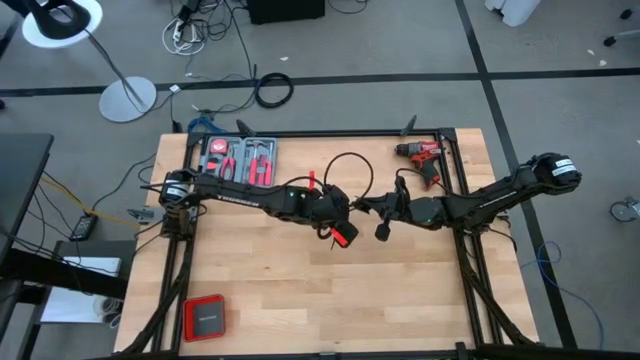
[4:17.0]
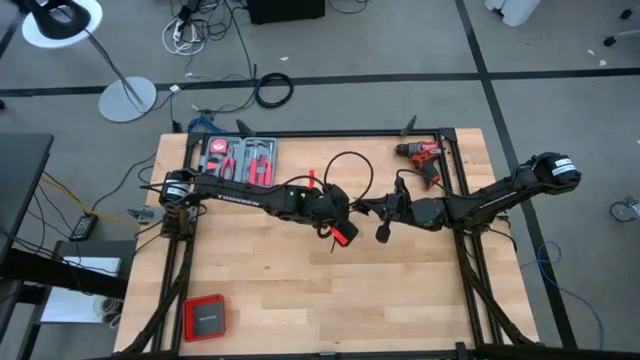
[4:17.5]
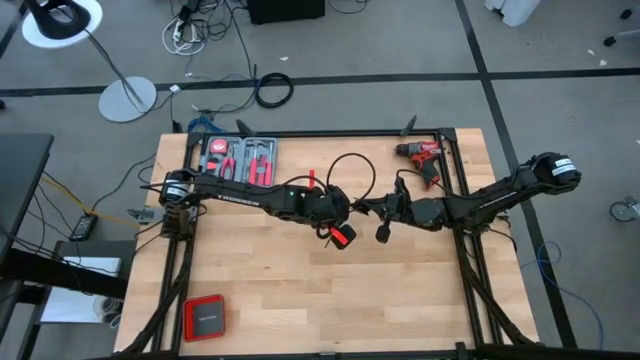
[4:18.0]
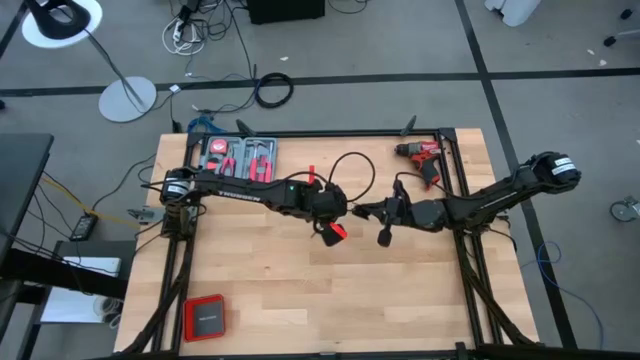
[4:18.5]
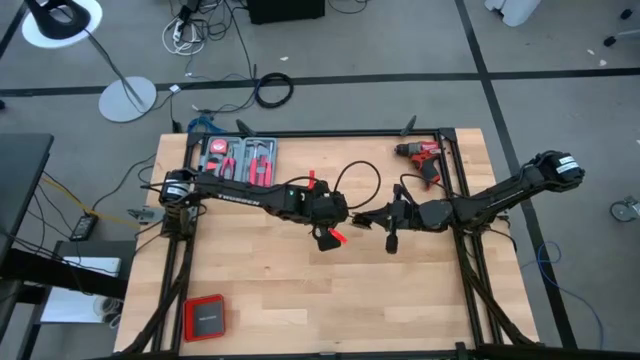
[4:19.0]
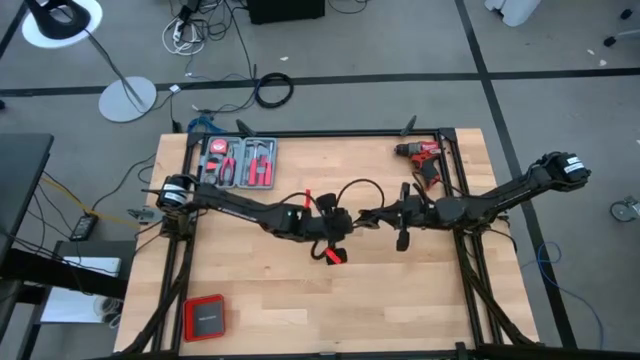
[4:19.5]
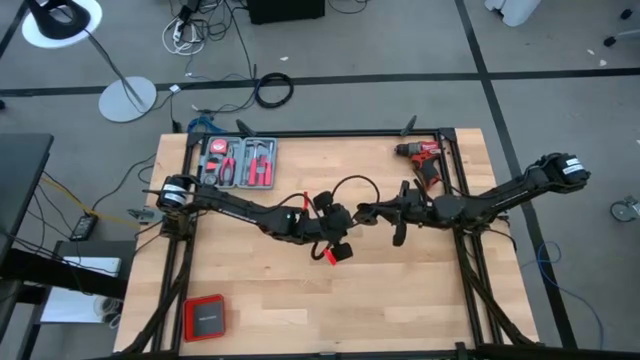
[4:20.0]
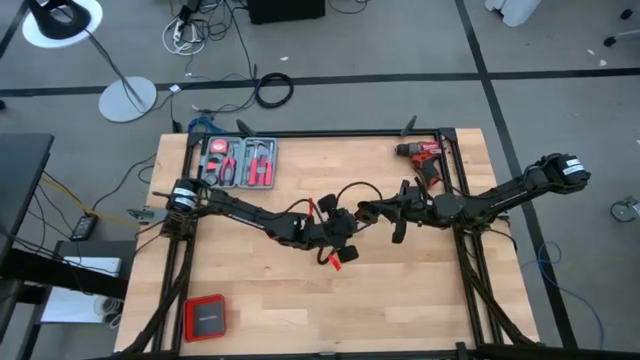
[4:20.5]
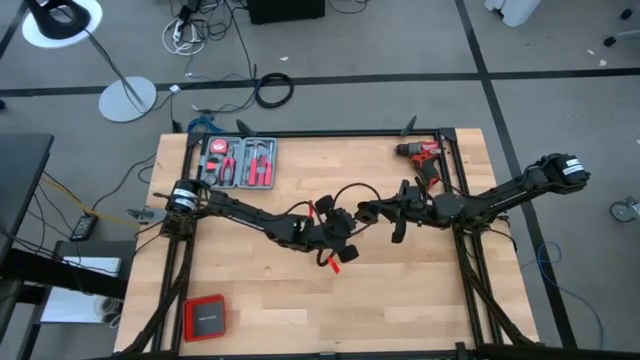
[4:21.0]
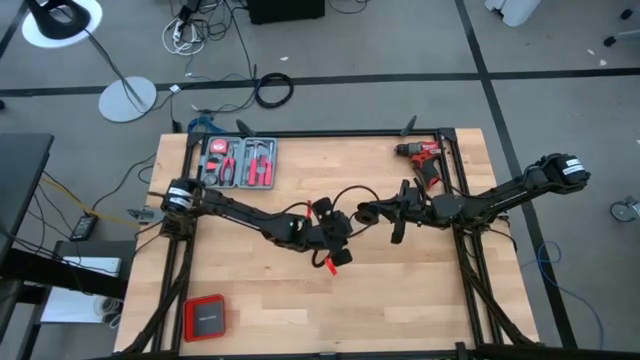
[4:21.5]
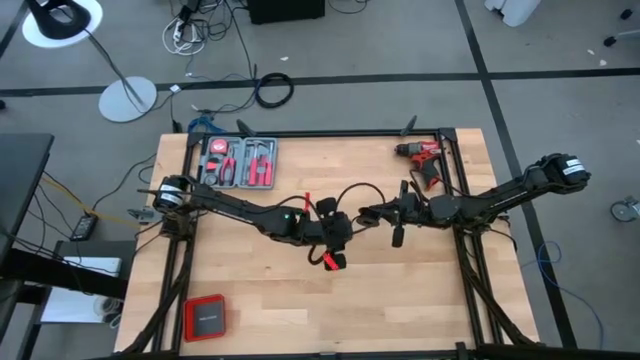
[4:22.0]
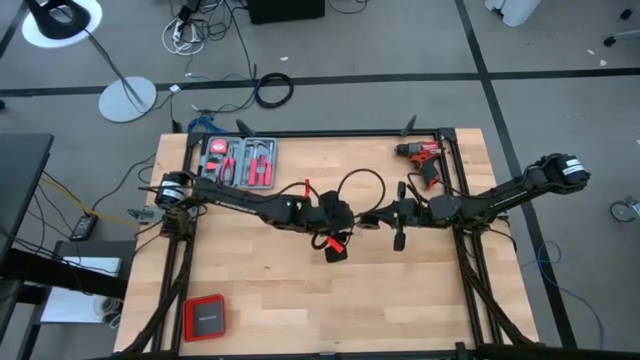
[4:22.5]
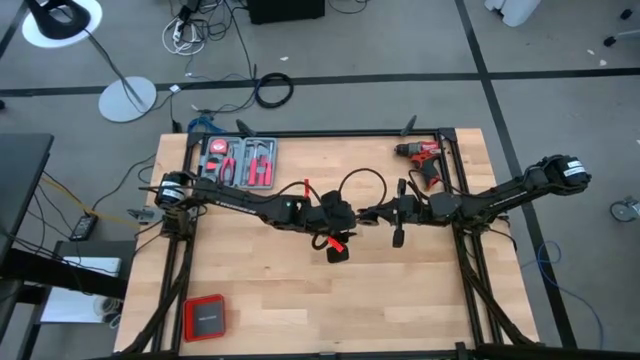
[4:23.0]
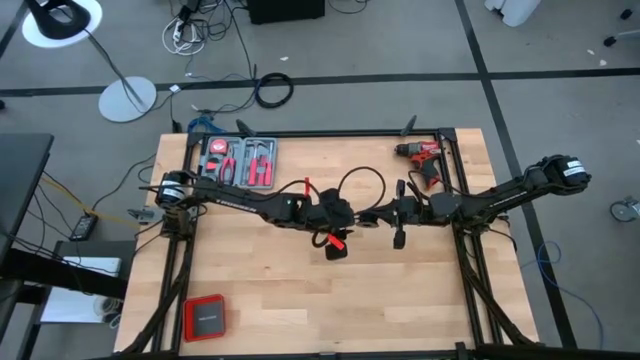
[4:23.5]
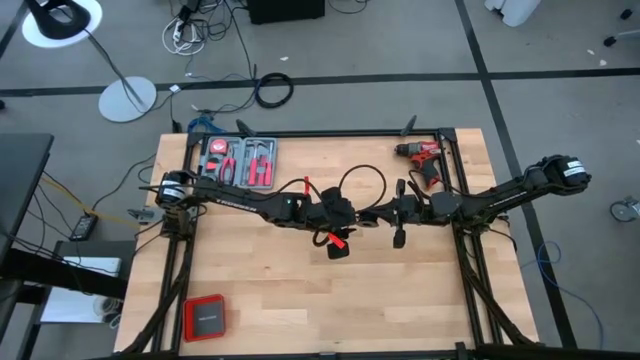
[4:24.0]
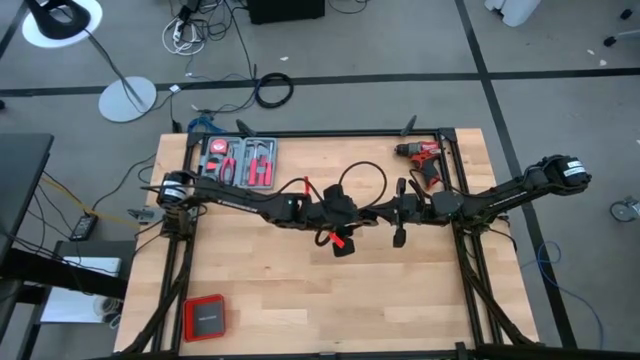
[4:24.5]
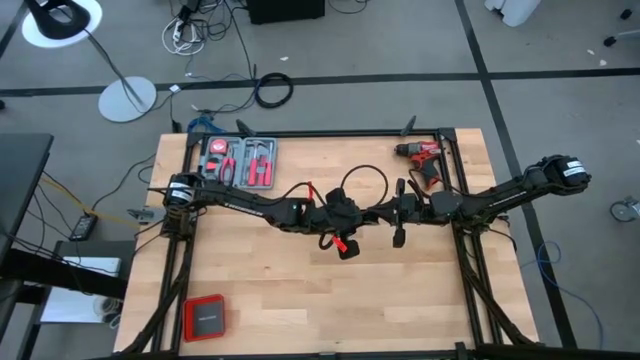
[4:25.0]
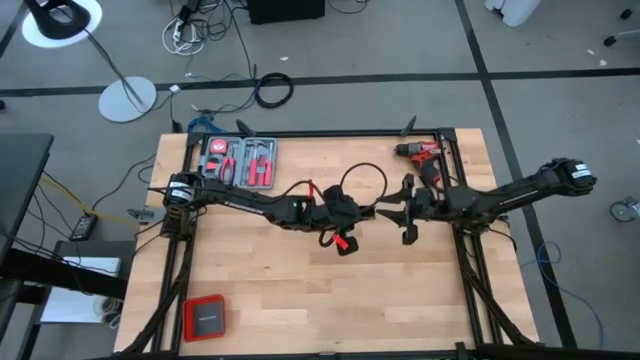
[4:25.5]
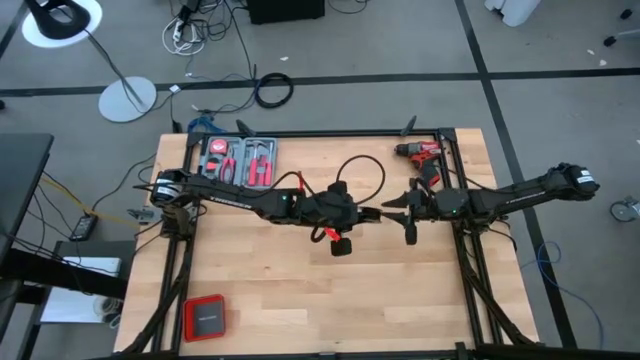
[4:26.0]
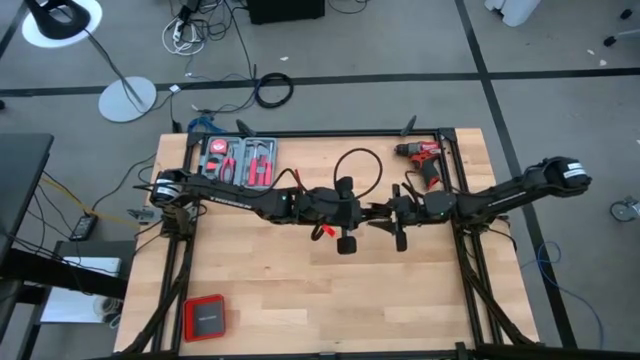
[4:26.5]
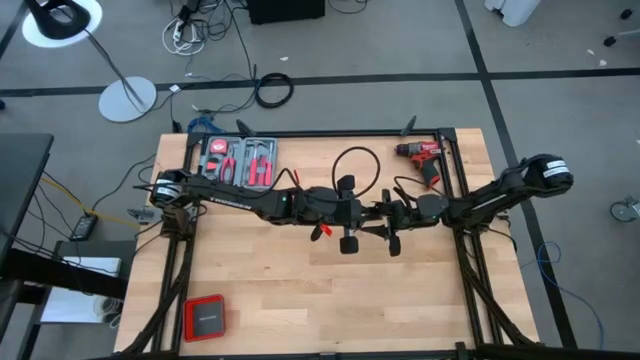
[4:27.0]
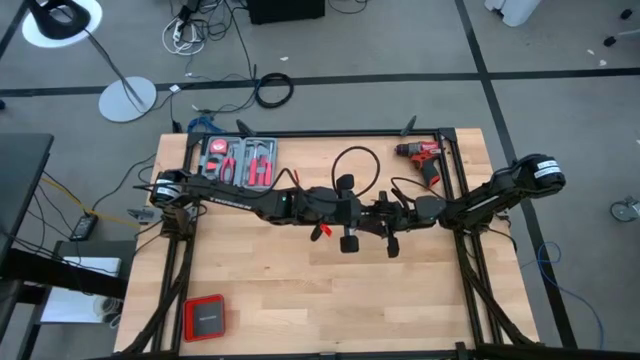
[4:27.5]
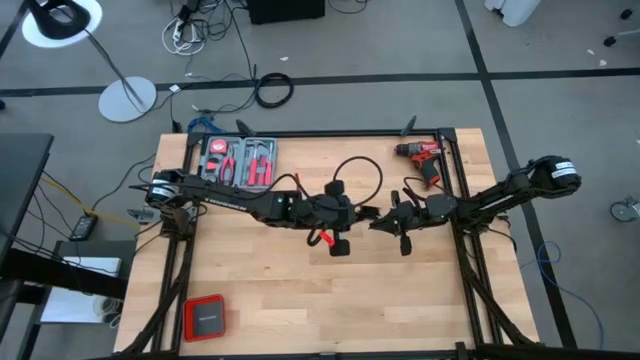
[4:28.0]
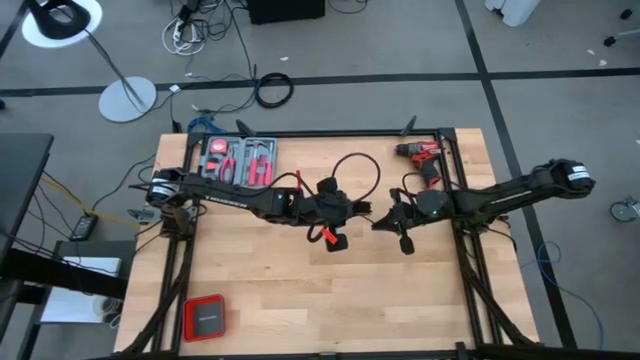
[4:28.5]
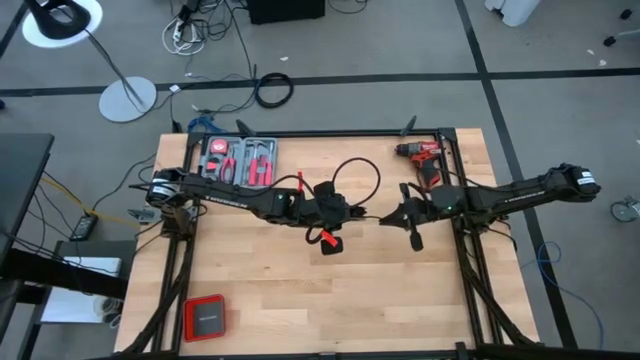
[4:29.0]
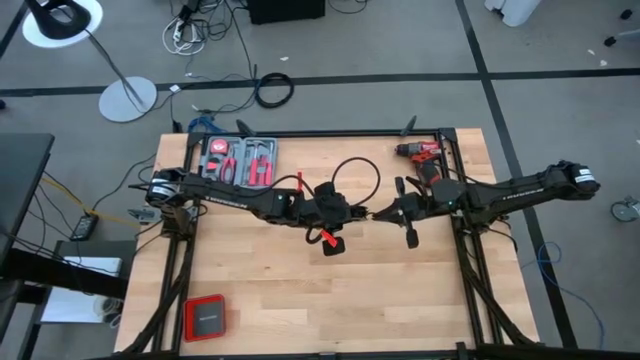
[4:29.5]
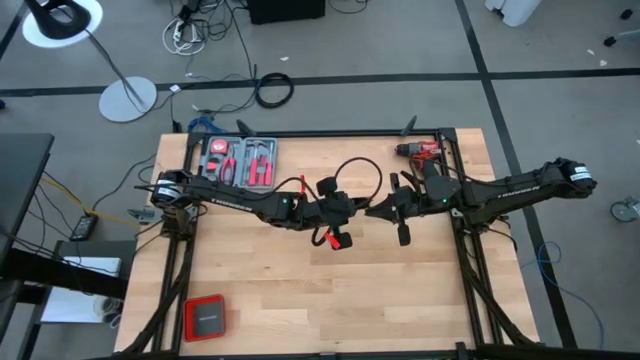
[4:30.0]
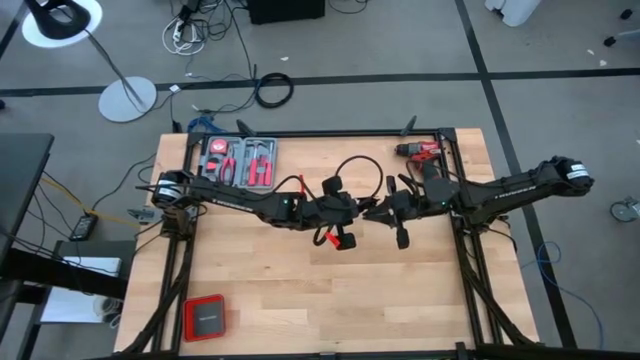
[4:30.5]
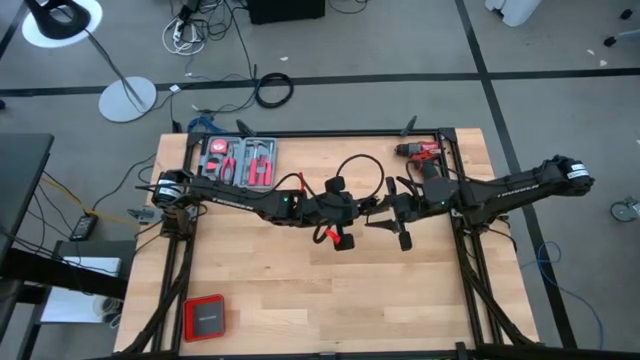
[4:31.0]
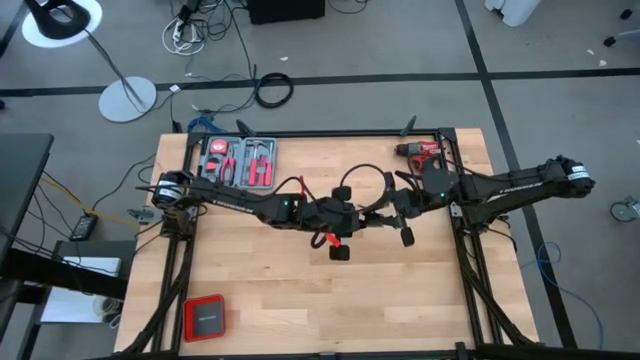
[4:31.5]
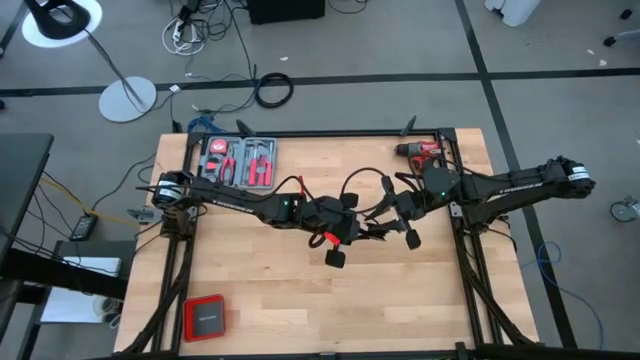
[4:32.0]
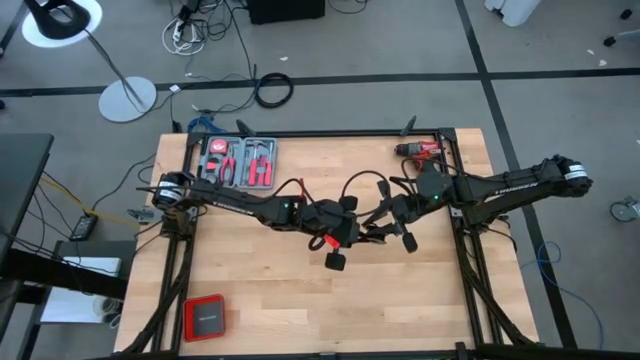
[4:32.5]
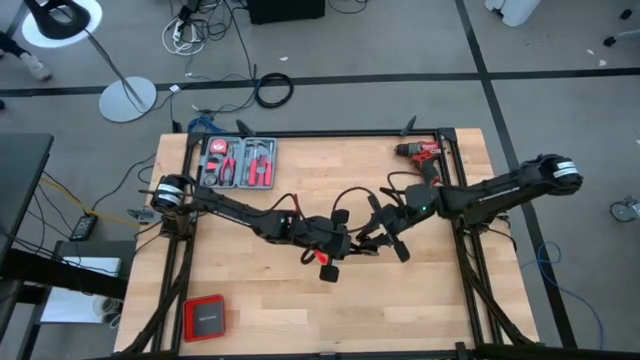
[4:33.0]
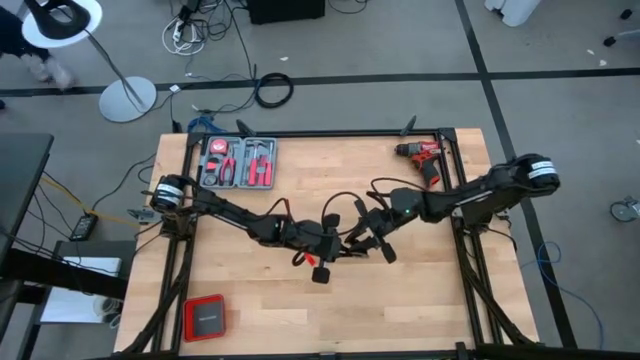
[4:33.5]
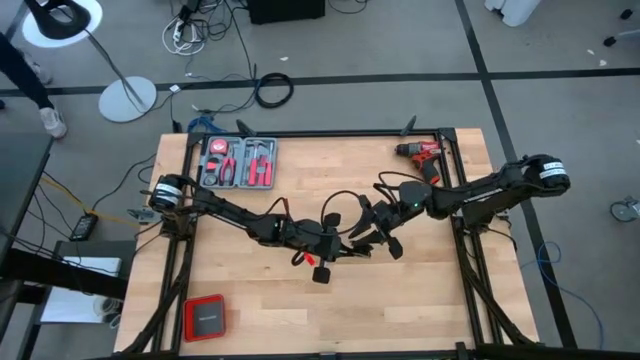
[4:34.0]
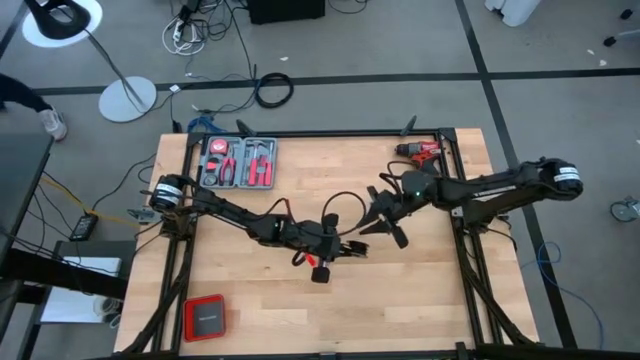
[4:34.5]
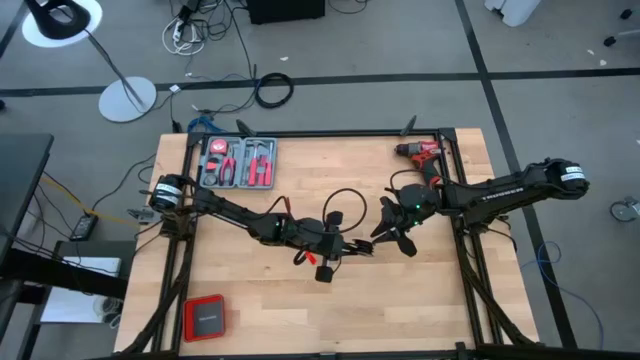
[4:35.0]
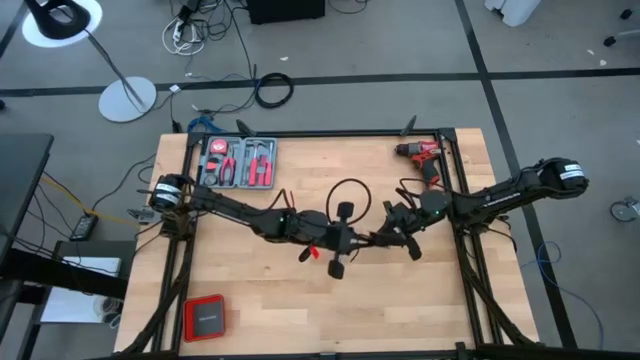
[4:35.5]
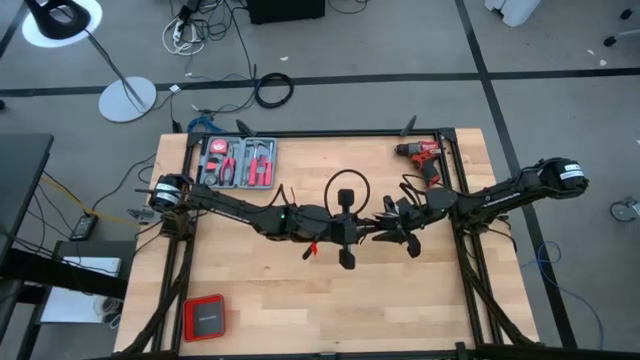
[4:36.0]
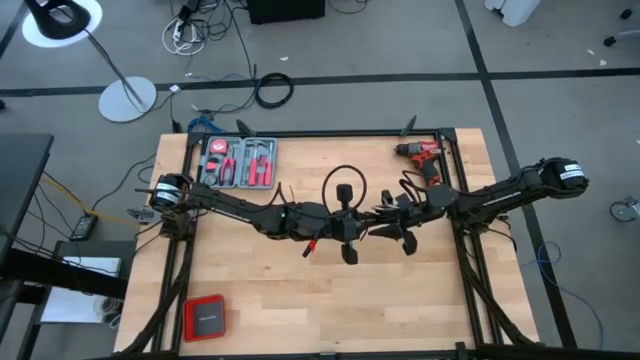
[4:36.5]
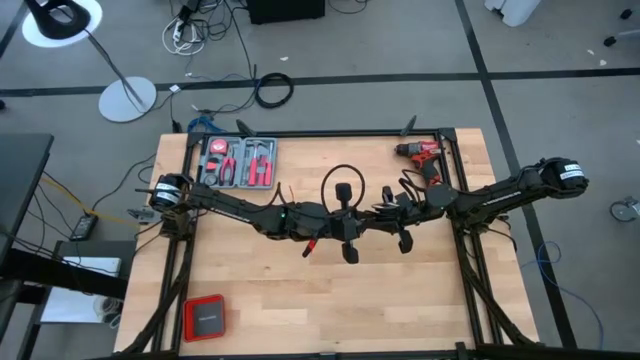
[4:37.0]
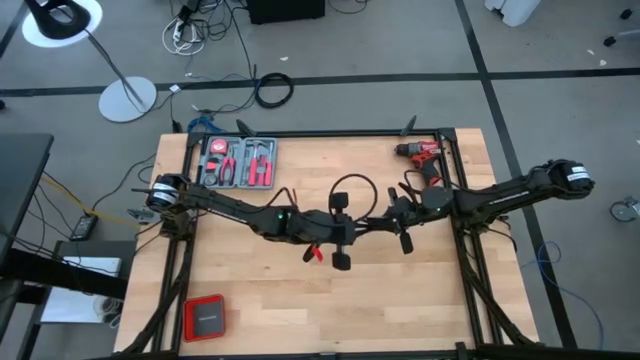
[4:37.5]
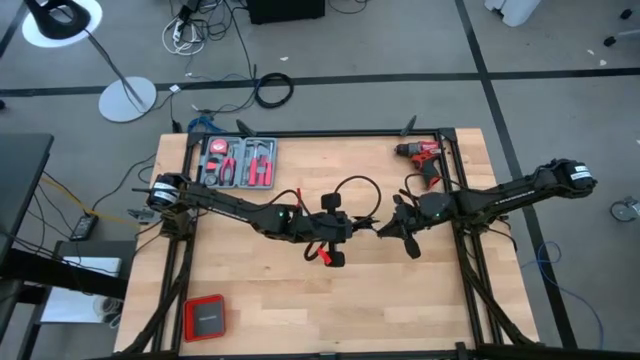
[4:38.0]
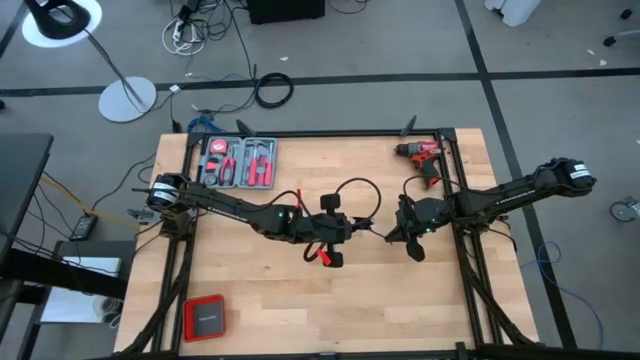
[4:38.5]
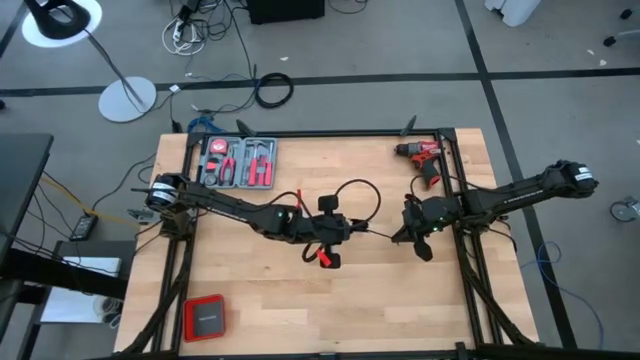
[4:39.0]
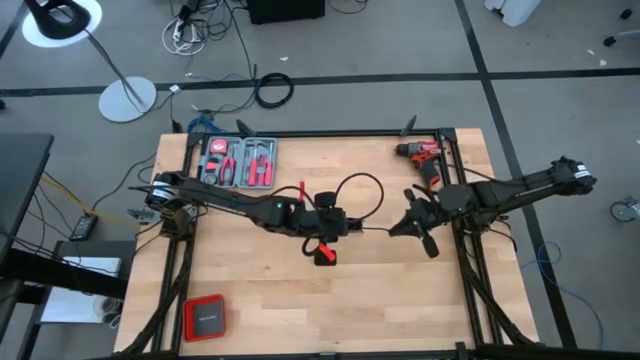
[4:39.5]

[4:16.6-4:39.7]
Task: Coil cords
Coil the black wire on the spool
